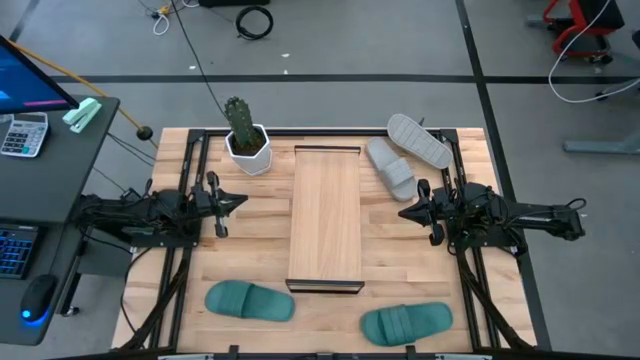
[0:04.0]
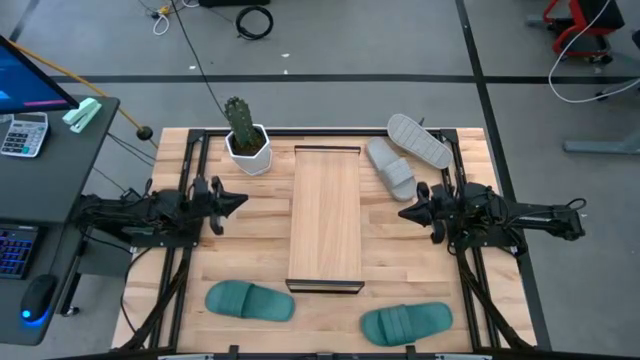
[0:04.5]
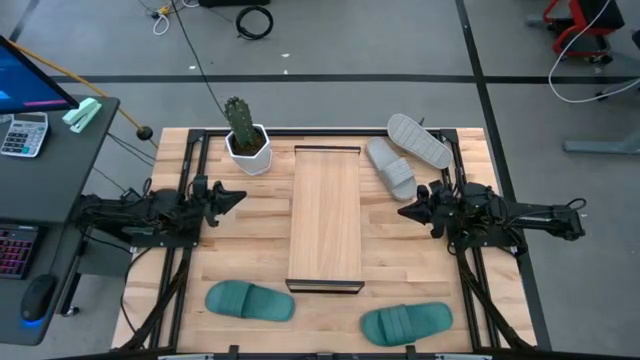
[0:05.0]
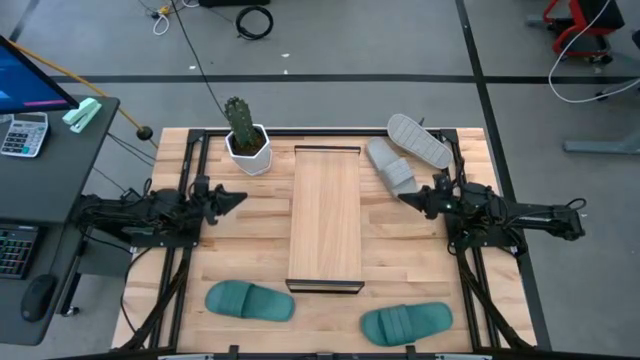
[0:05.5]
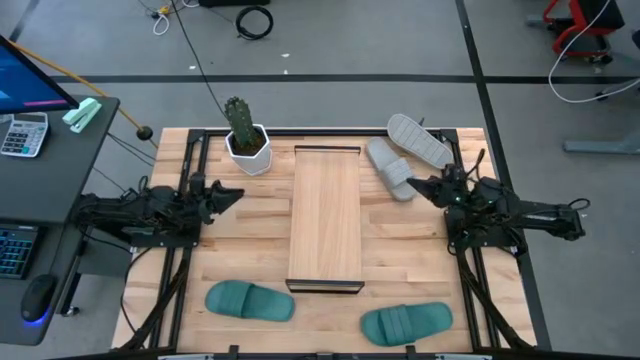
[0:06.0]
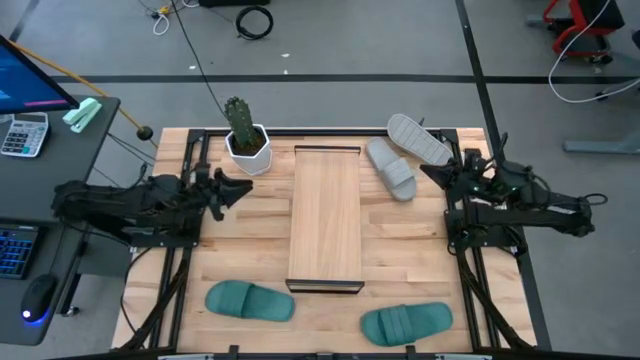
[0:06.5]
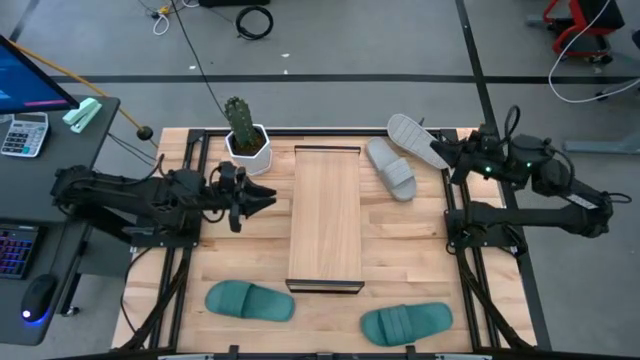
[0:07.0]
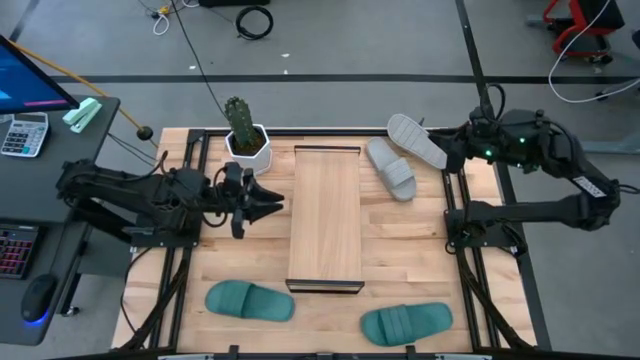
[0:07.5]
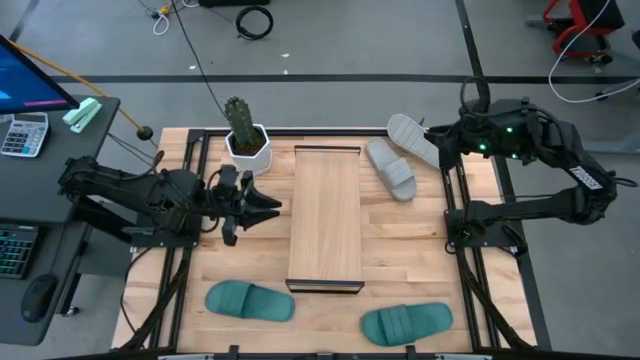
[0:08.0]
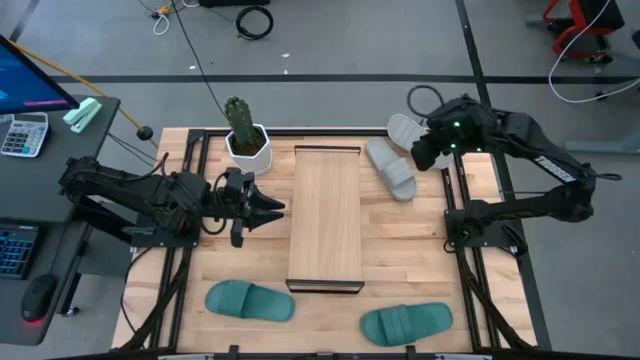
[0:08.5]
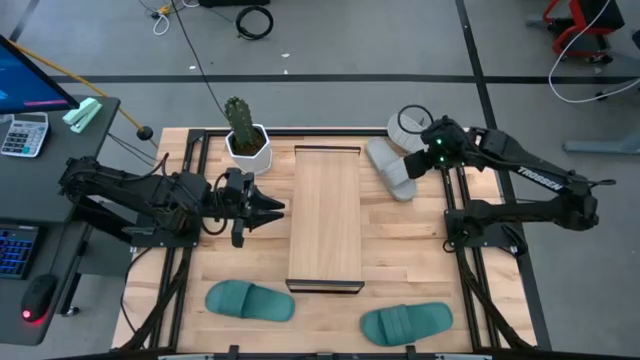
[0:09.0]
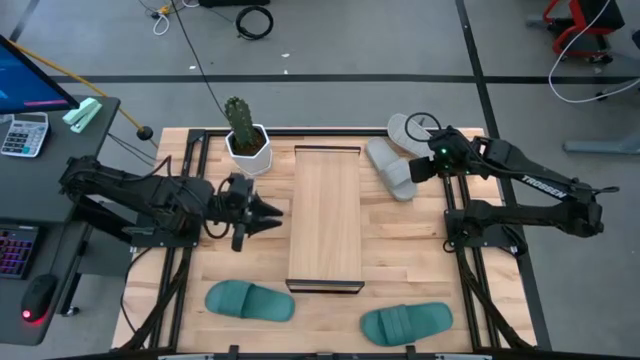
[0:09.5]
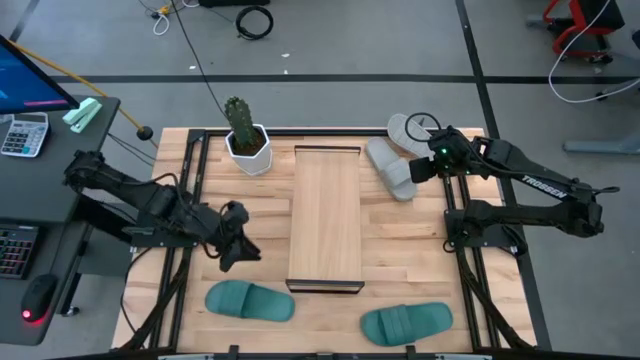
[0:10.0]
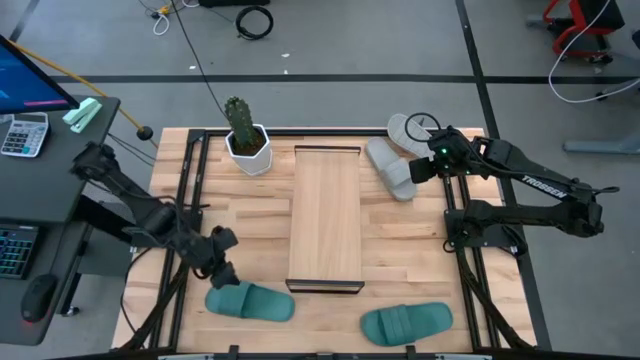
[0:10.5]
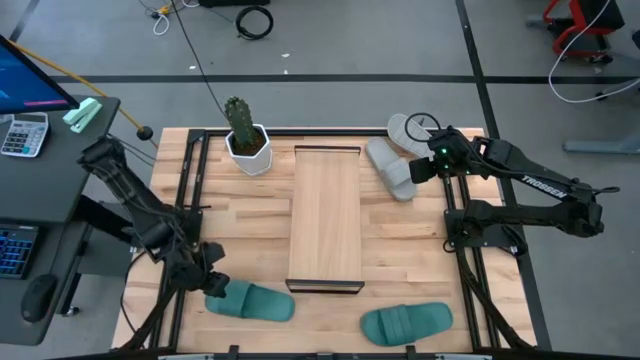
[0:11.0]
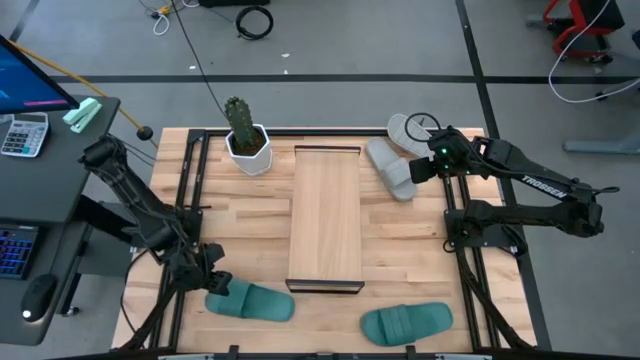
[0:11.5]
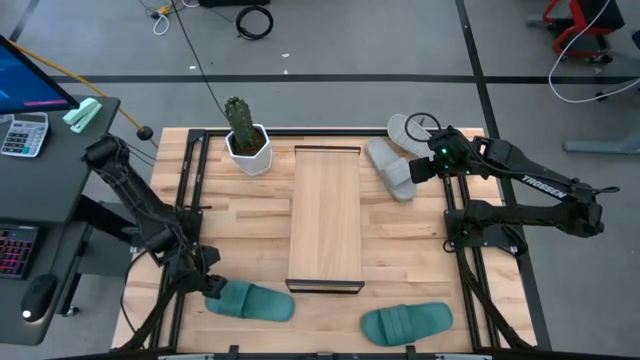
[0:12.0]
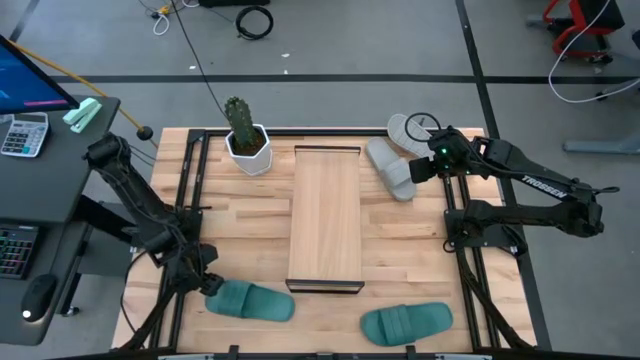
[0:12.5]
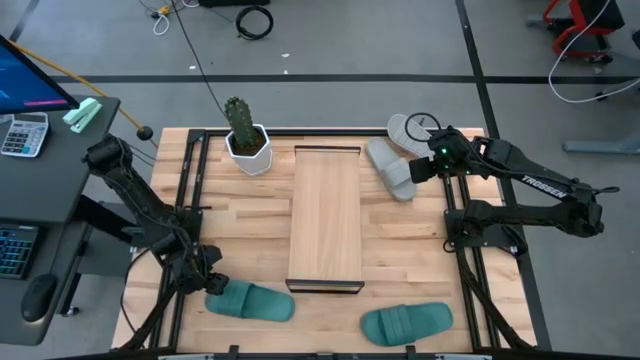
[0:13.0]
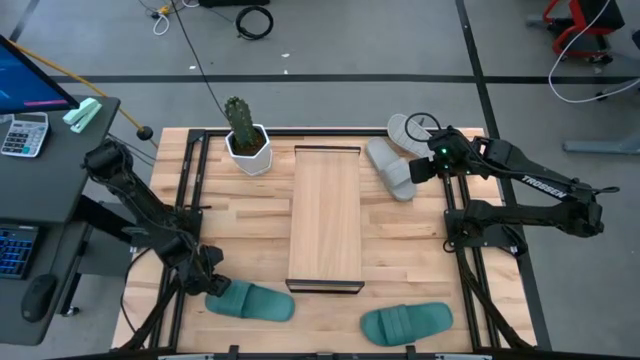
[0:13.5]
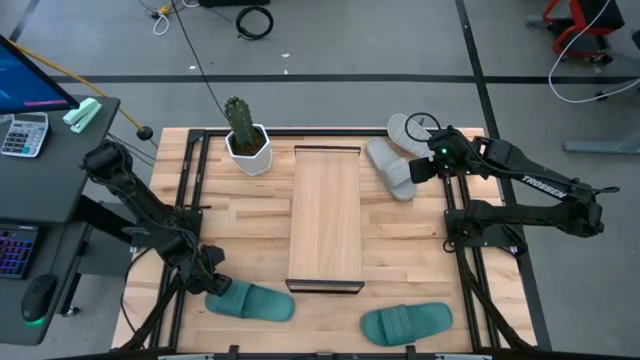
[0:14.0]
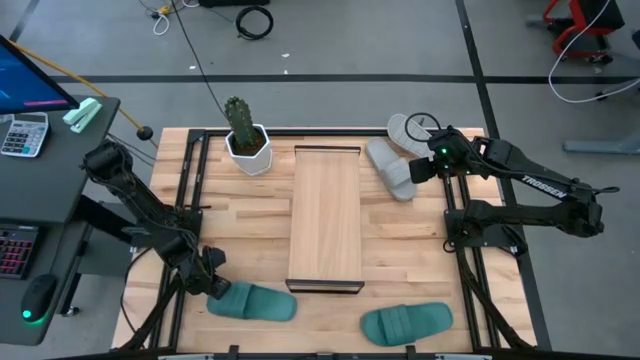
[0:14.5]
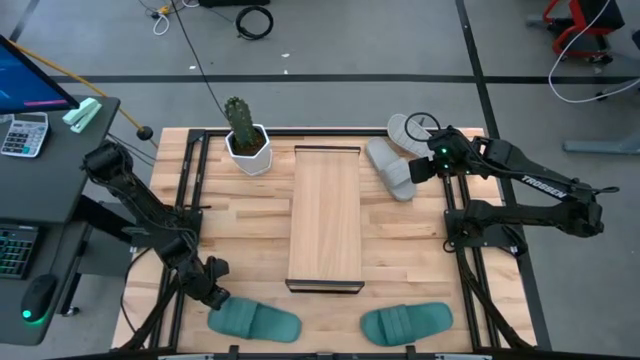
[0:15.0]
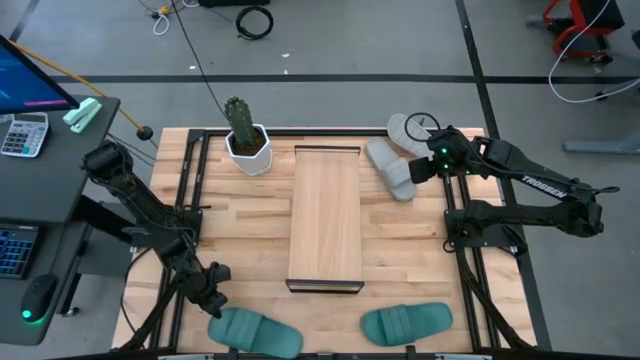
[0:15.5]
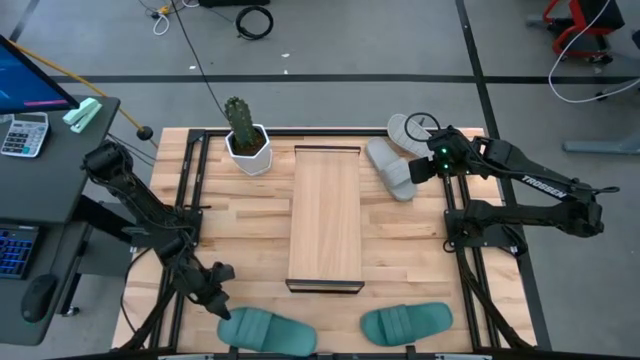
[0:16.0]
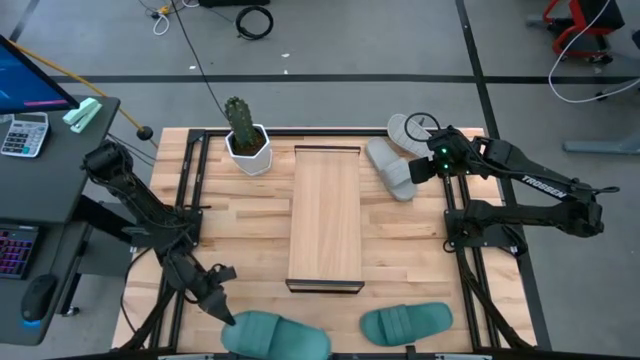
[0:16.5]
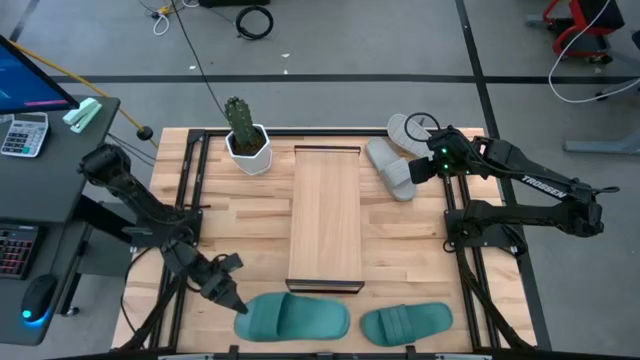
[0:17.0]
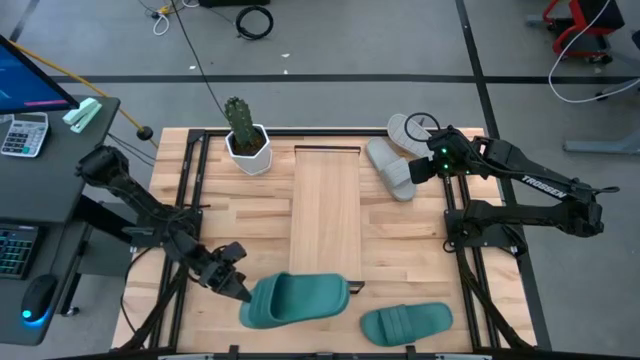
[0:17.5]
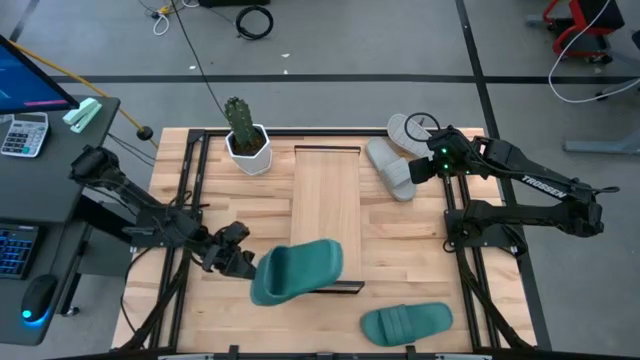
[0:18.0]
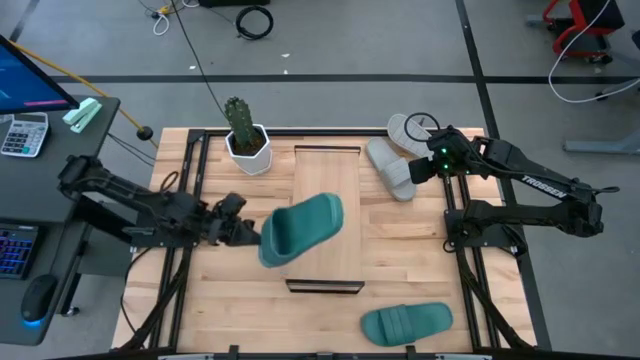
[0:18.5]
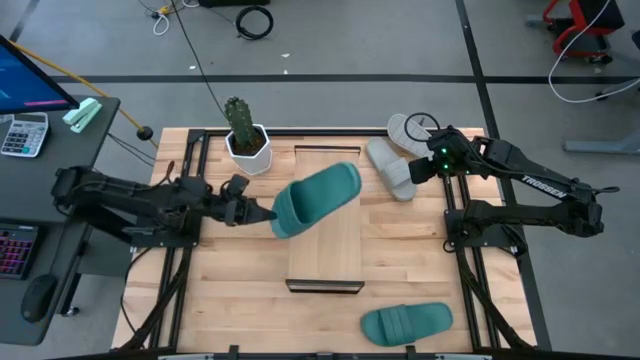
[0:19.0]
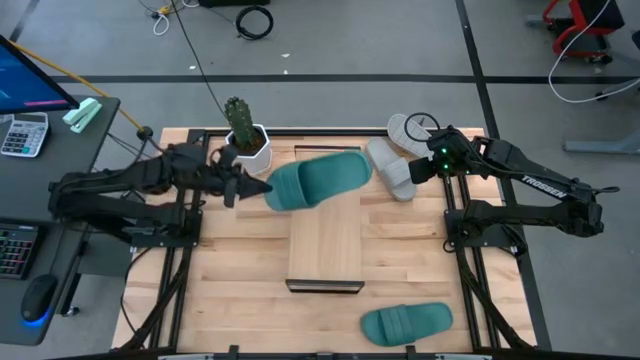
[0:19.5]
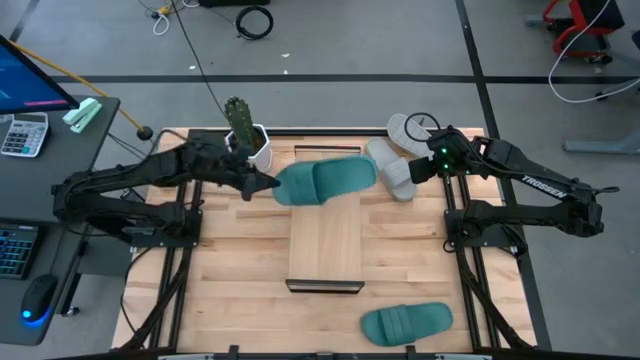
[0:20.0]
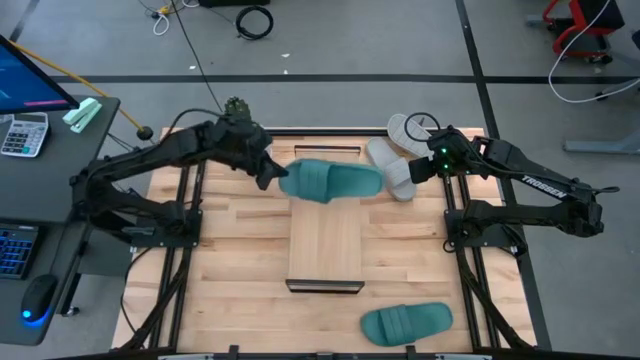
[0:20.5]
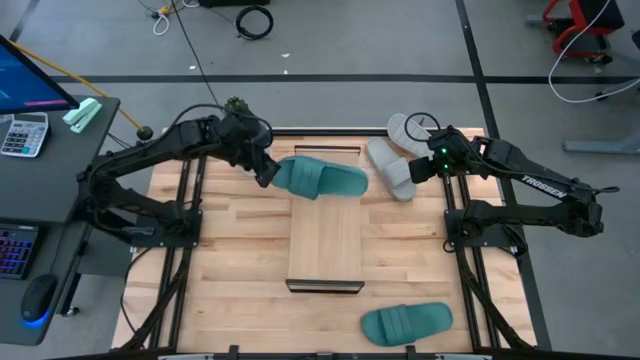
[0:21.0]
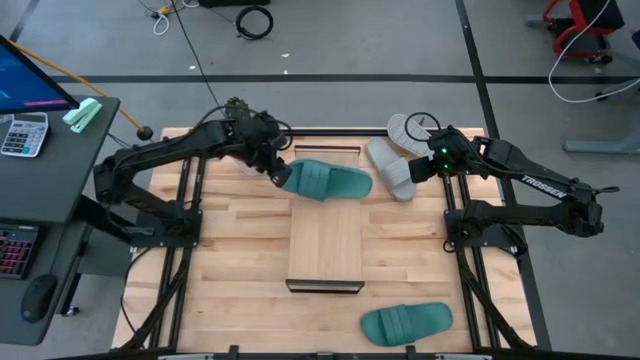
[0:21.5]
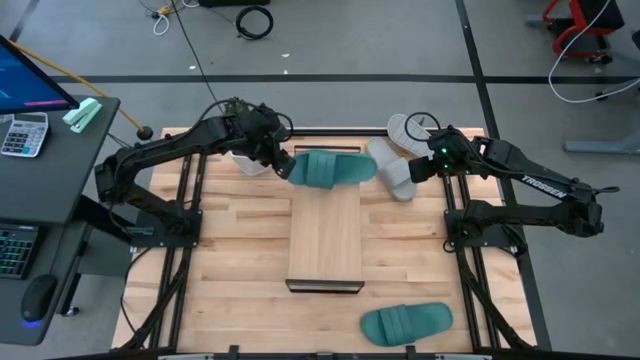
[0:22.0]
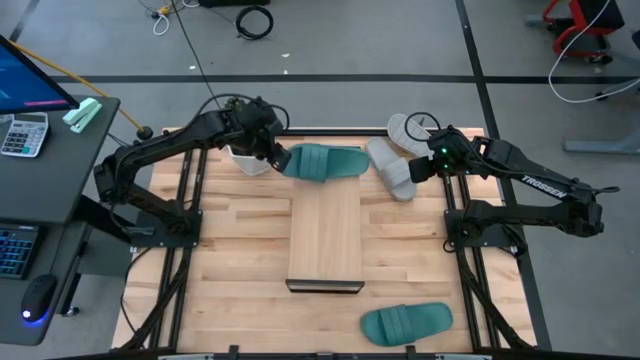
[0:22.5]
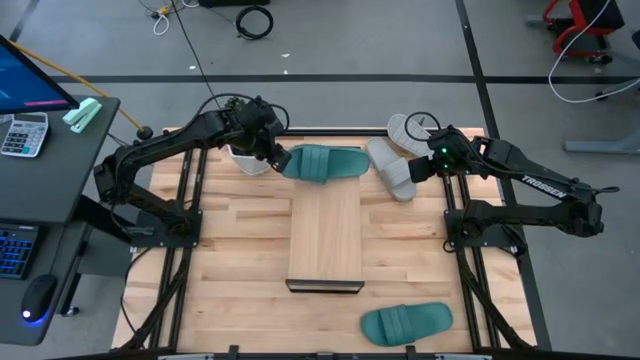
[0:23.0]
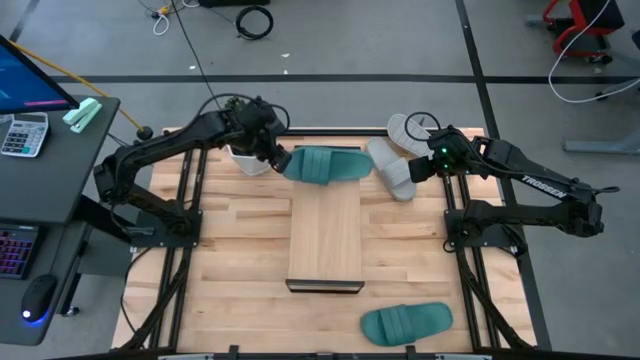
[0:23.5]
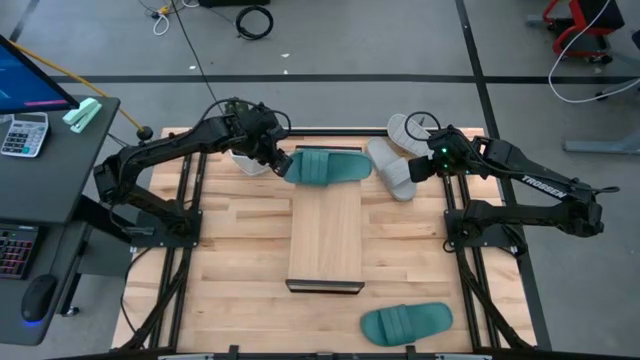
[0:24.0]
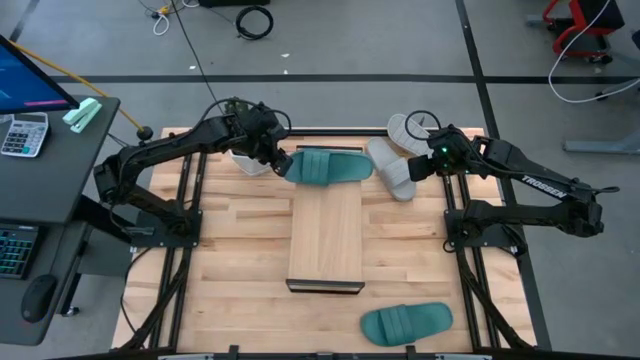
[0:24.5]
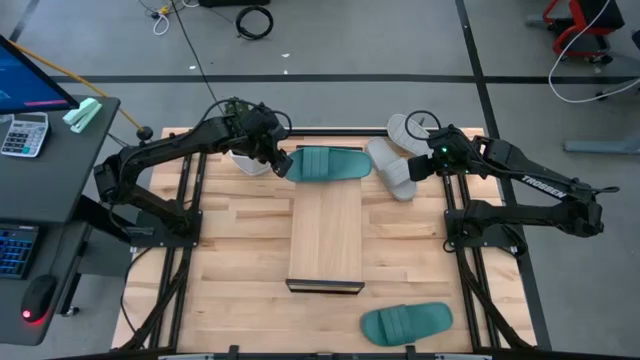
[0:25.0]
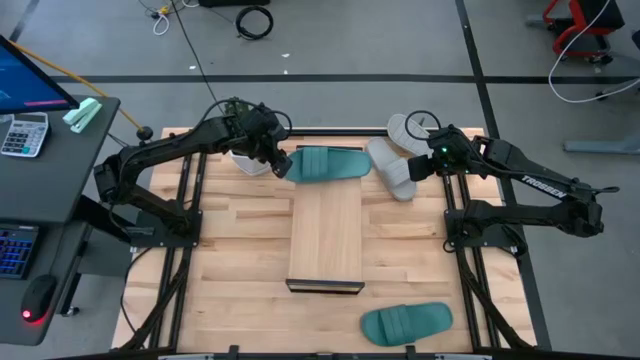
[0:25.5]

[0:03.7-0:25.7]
Task: Pick and place slides into the shelf
Put the left green slide on the shelf
